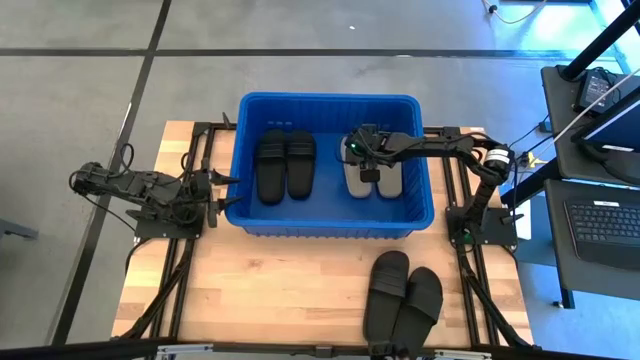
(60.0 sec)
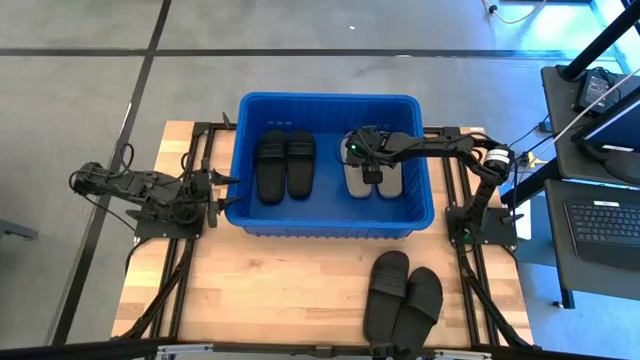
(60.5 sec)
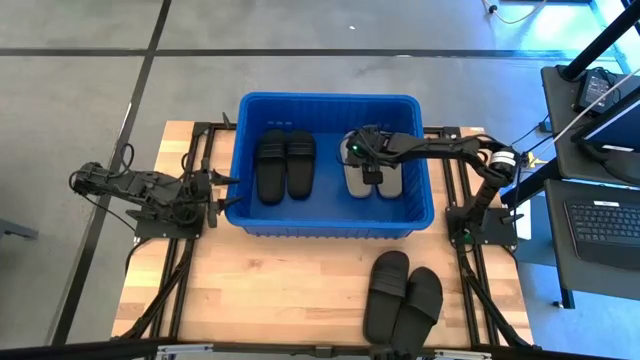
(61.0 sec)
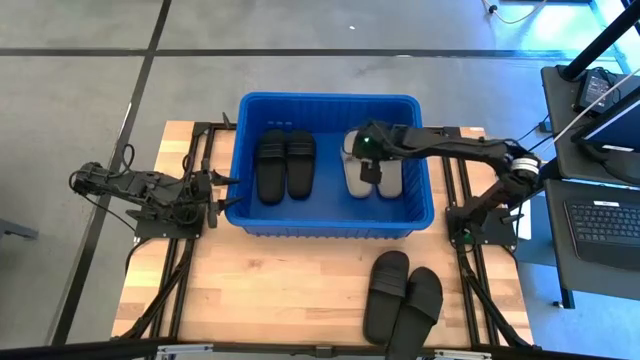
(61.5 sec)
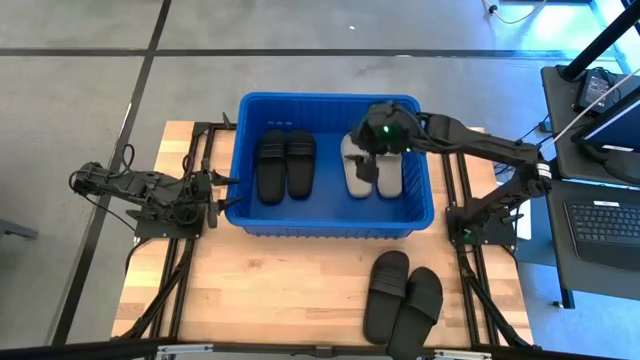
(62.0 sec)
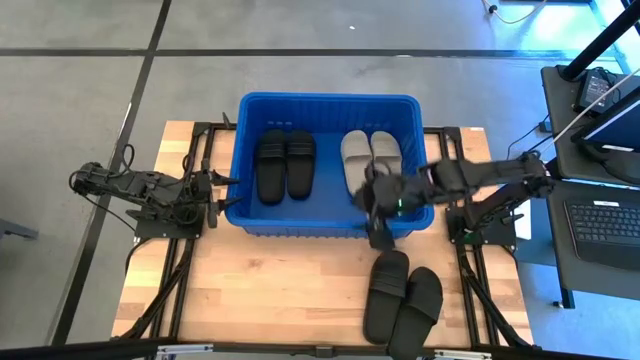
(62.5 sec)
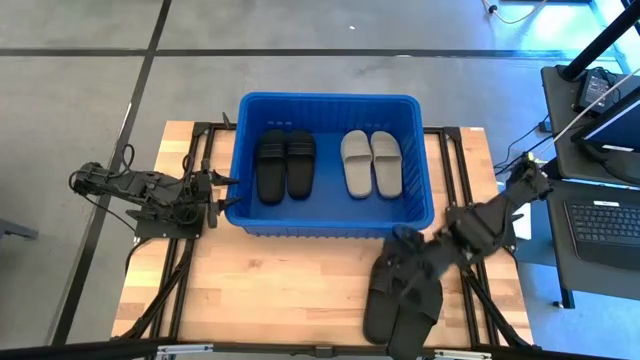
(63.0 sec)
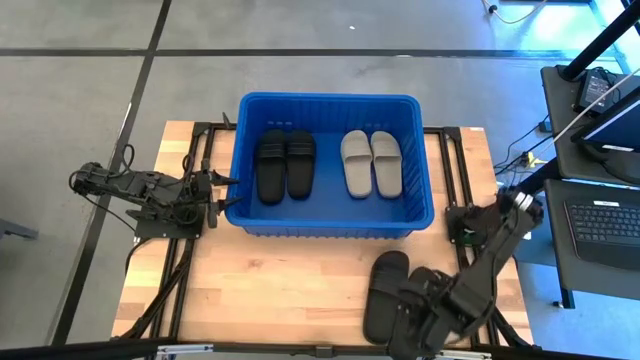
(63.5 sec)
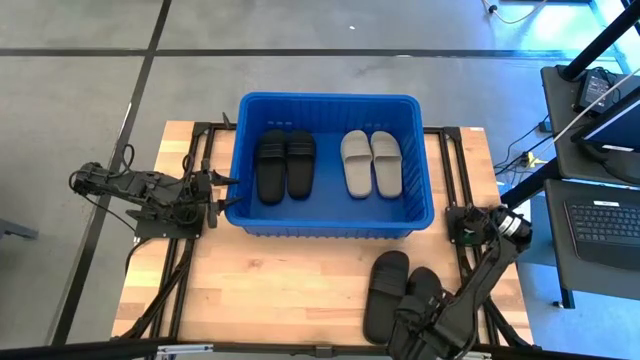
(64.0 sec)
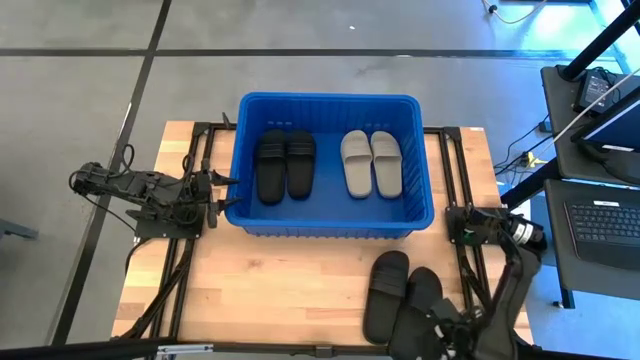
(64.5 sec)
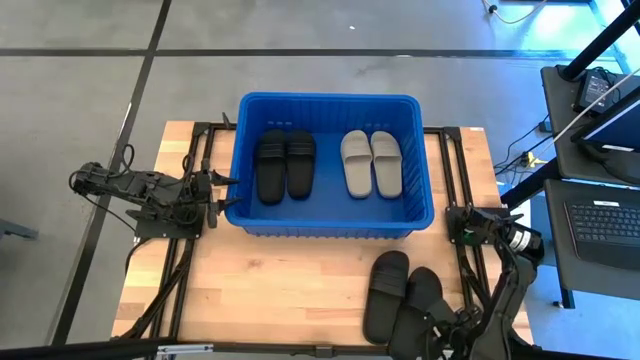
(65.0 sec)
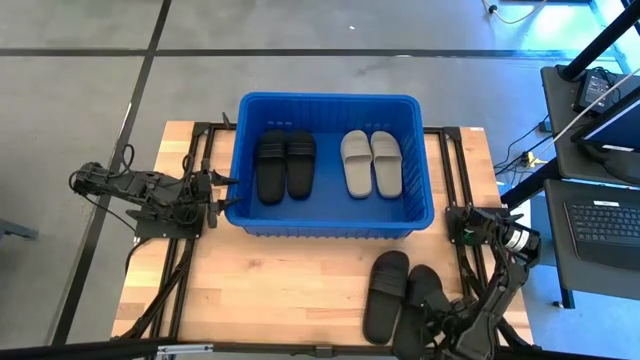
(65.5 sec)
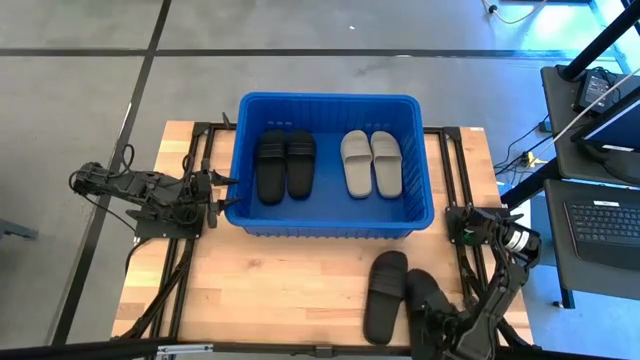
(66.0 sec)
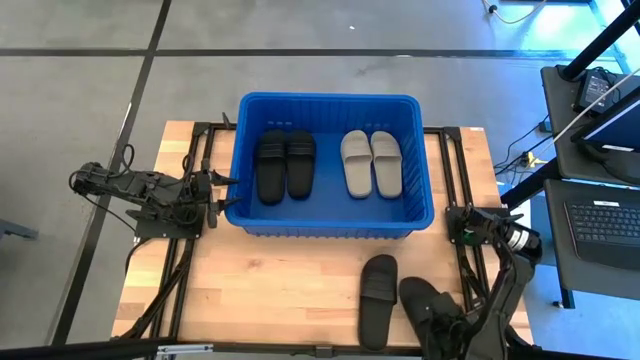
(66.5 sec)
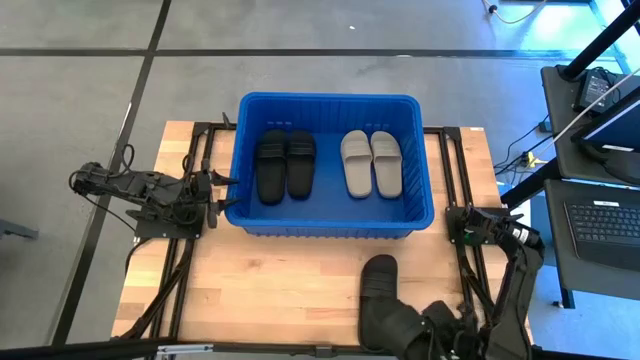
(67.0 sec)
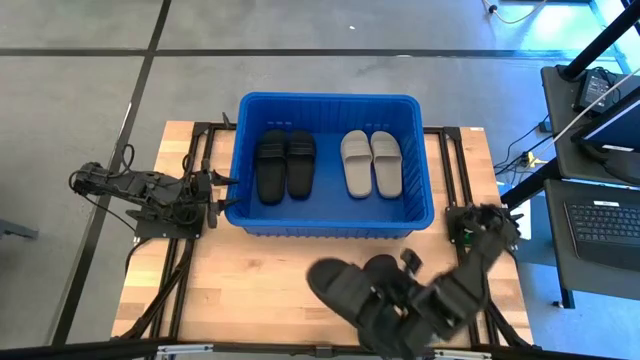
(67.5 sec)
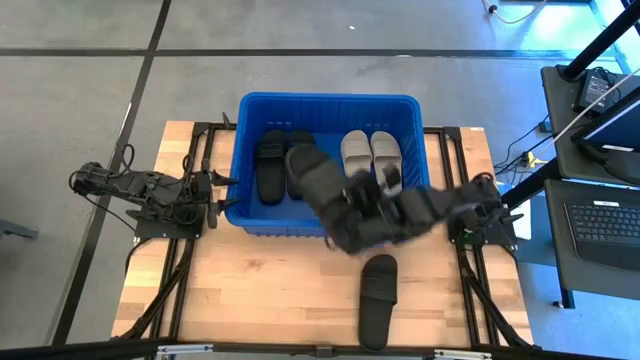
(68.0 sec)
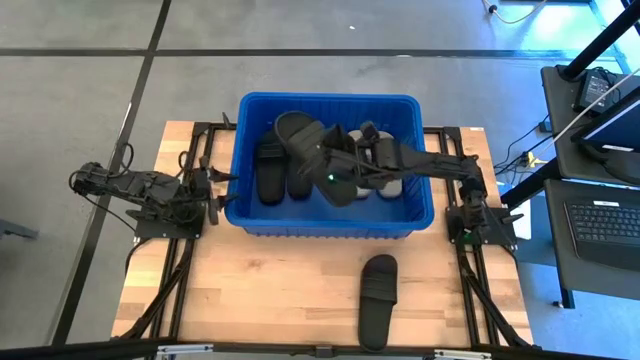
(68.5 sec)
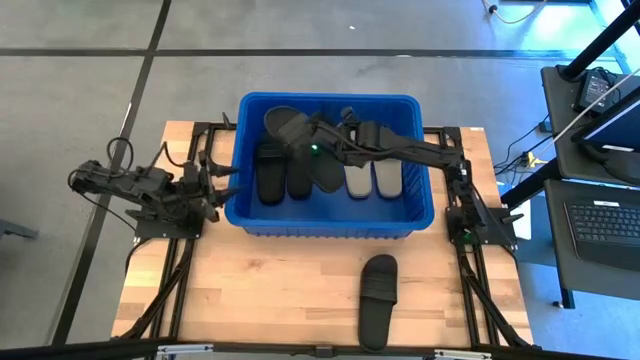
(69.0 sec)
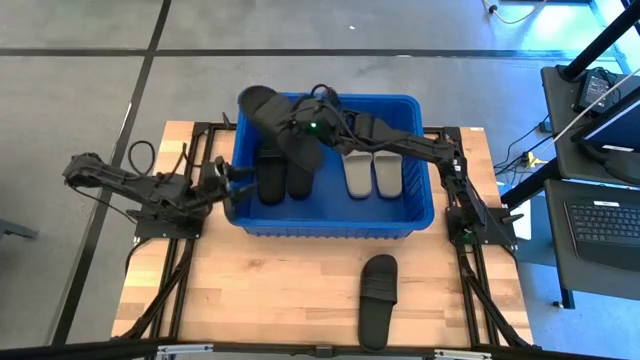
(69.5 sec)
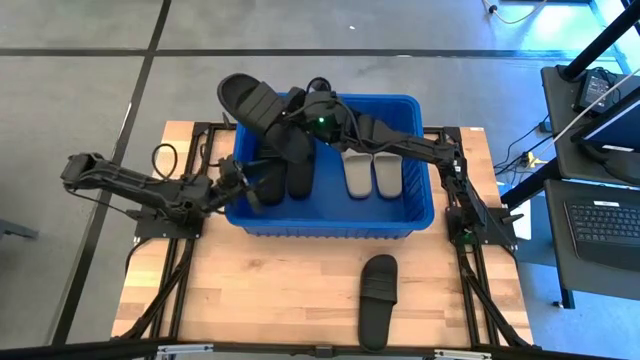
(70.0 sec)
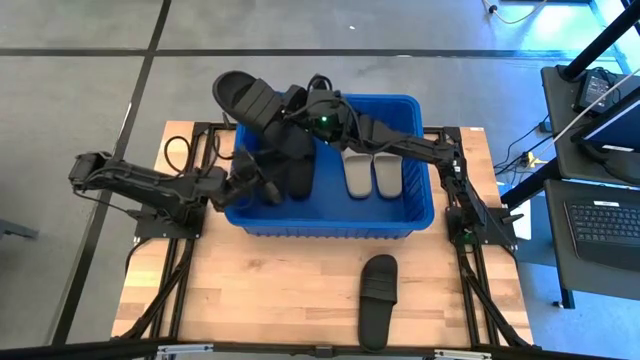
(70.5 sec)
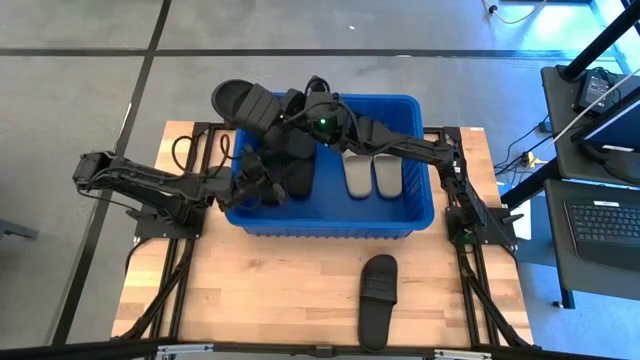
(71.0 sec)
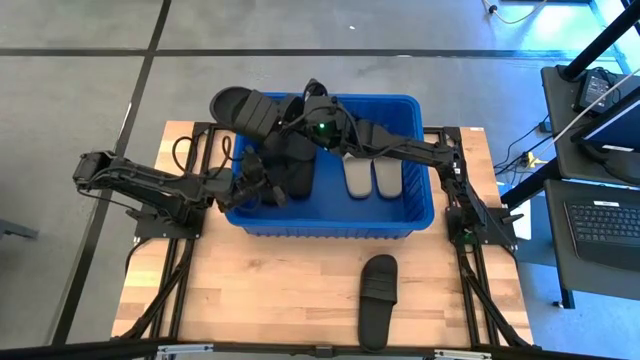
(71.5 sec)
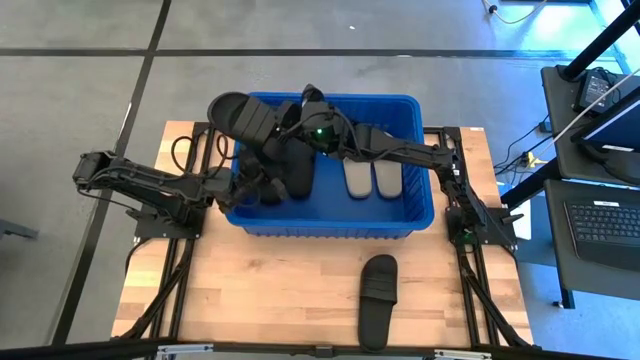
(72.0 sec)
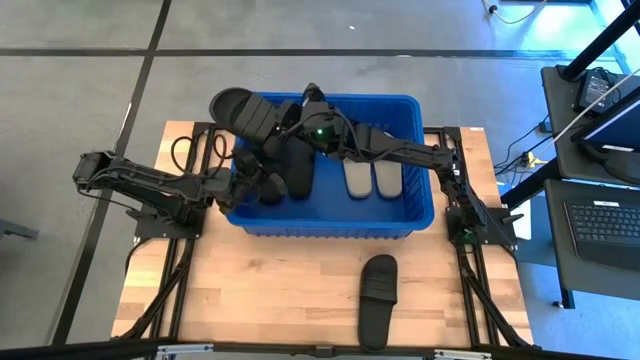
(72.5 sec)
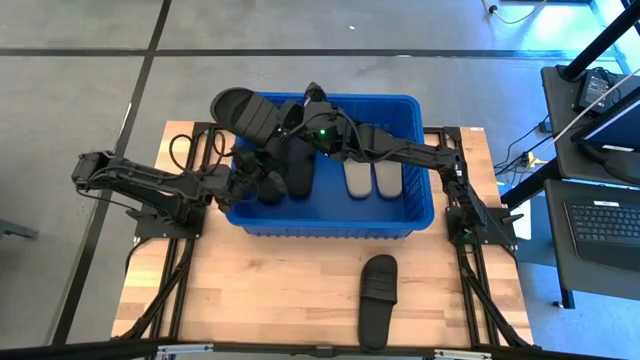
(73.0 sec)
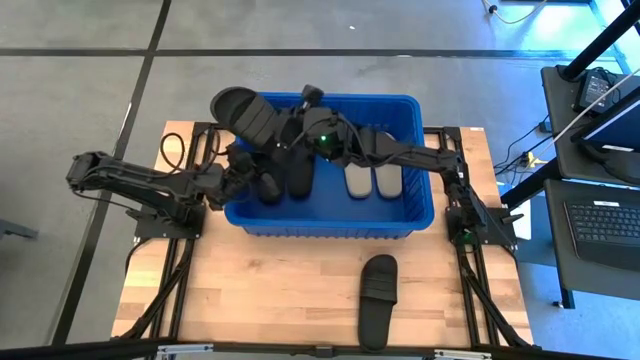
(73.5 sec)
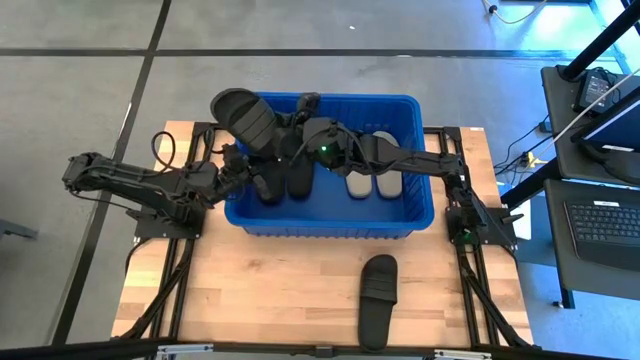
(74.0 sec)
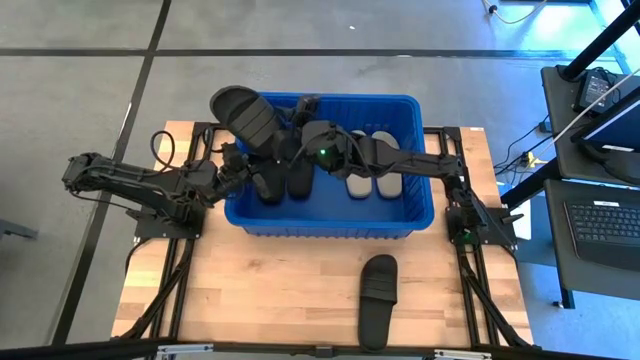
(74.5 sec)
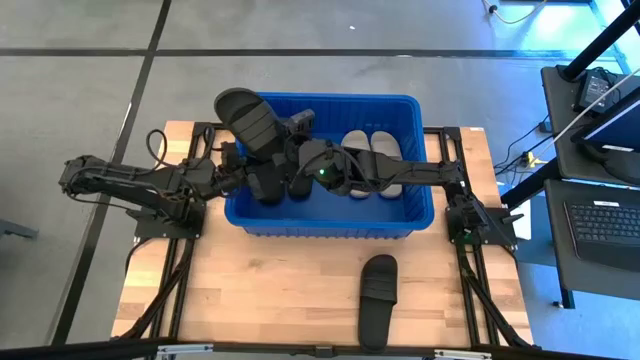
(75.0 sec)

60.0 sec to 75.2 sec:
Task: Pick and place slides into bin
Put the black slipper into the blue container

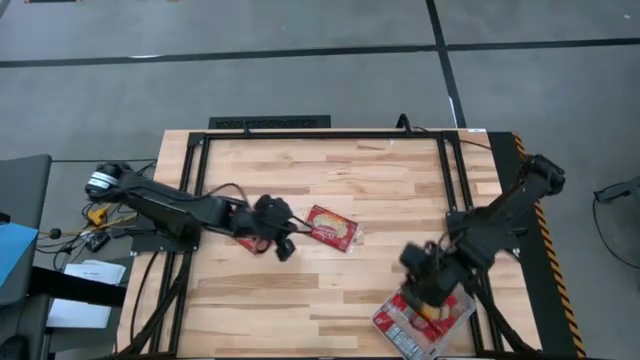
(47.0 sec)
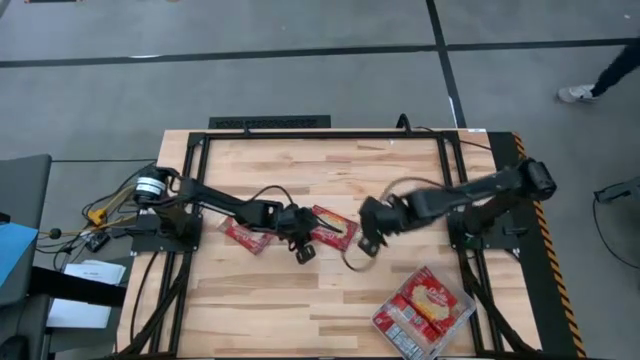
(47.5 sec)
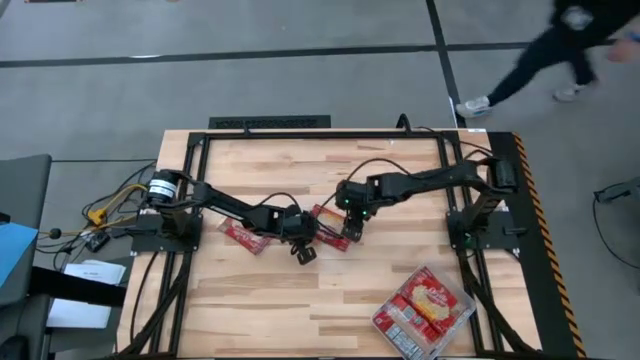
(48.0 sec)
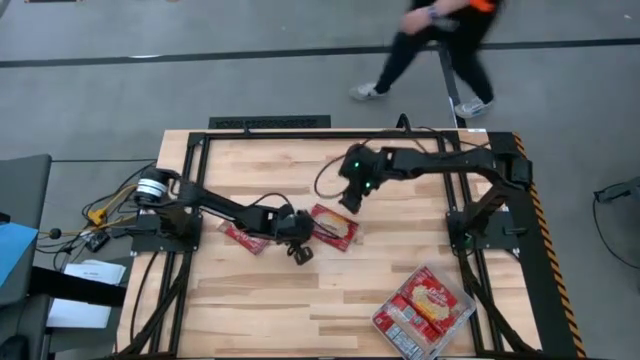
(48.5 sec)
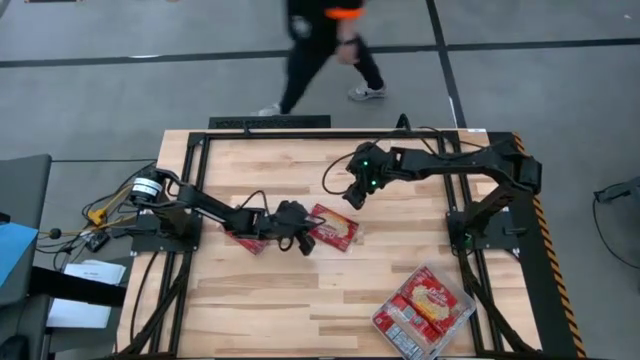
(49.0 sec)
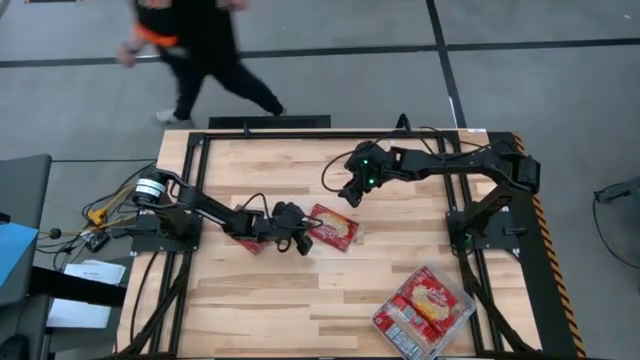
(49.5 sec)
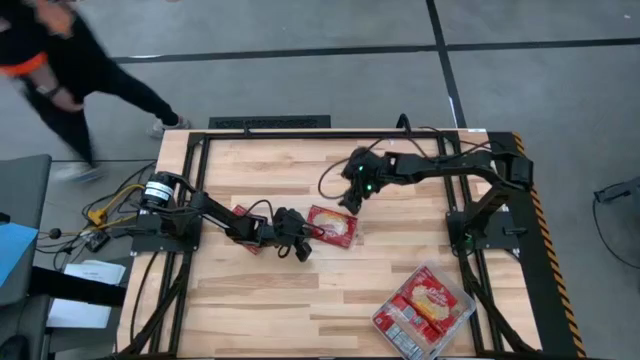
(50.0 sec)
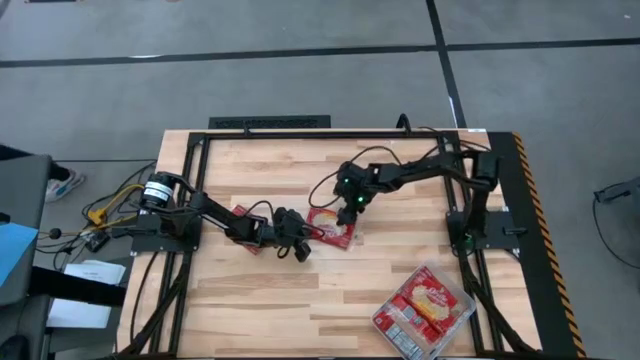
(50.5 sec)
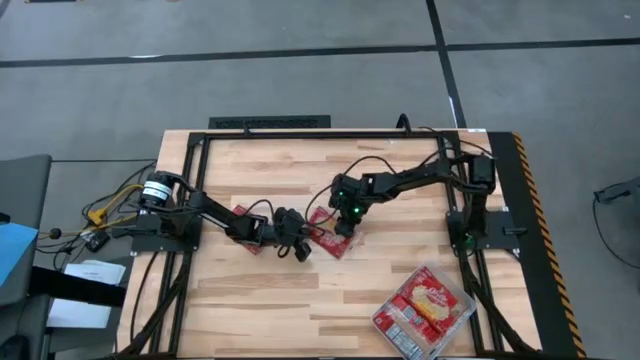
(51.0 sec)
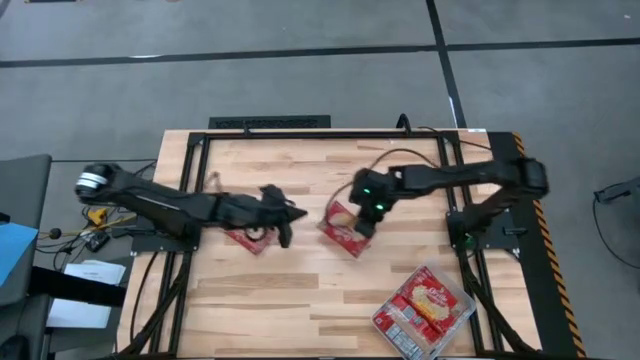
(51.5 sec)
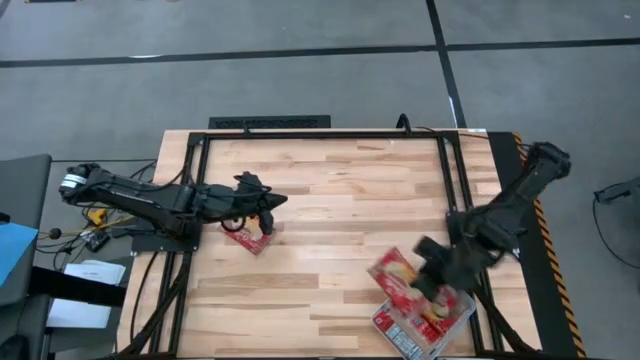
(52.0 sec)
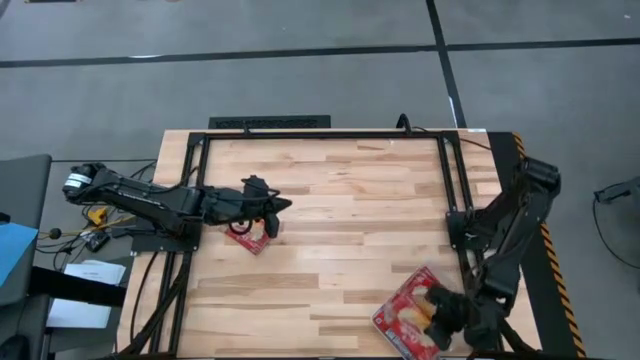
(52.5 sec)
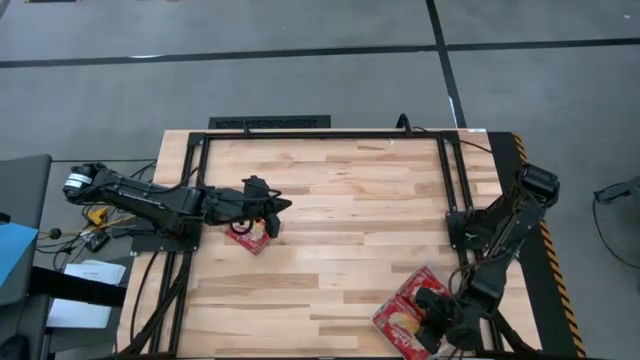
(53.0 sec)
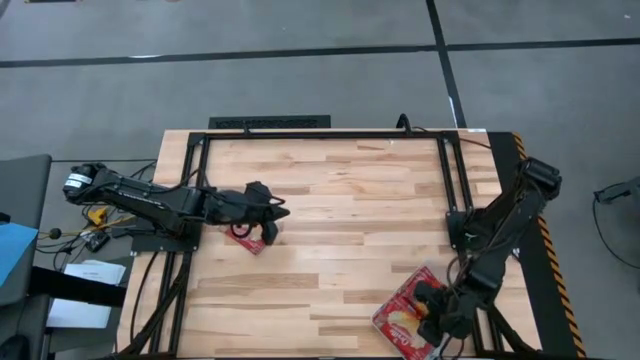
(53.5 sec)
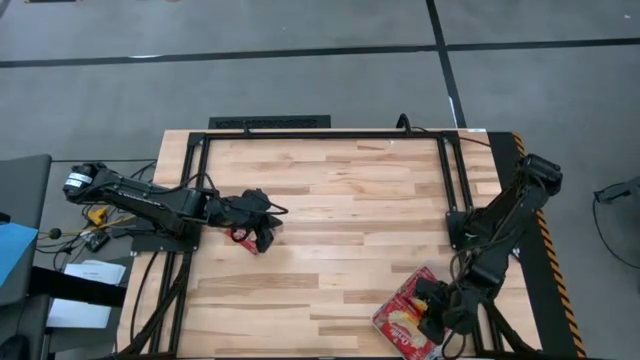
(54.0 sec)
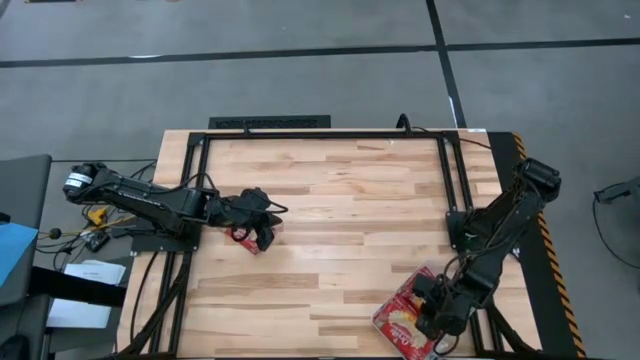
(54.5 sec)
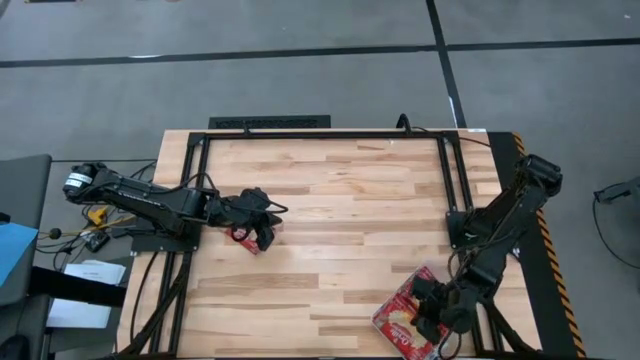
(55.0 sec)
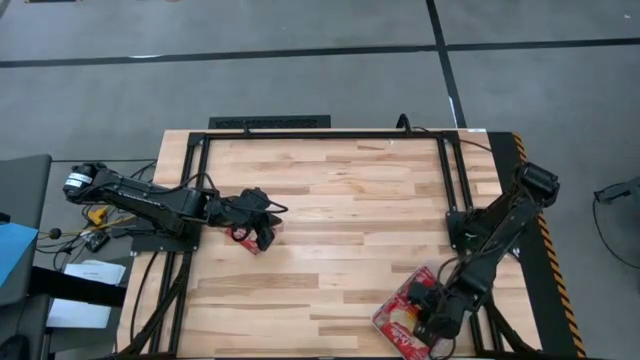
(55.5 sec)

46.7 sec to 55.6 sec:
Task: Sort popcorn bags into baskets
Put the red popcorn bag into the transparent bin
